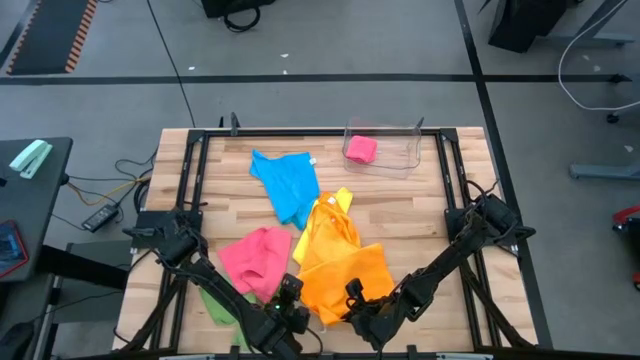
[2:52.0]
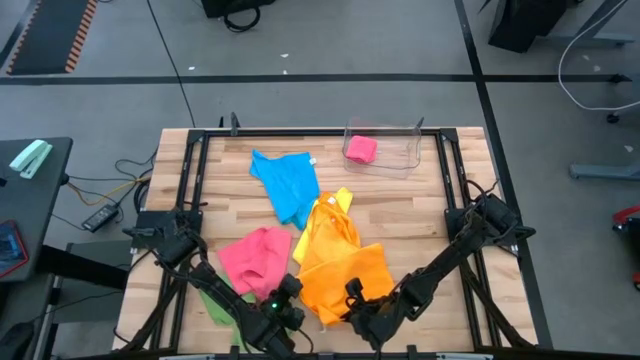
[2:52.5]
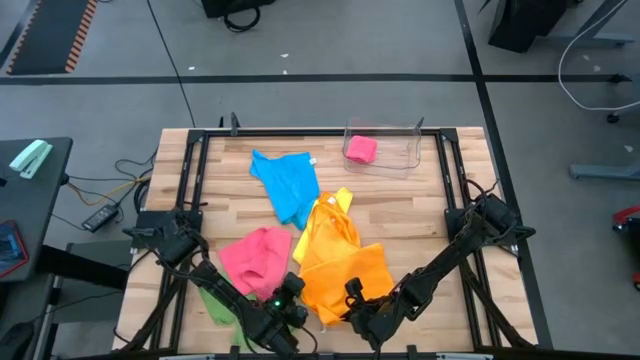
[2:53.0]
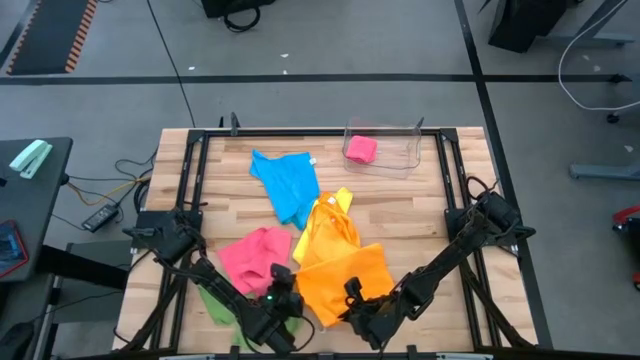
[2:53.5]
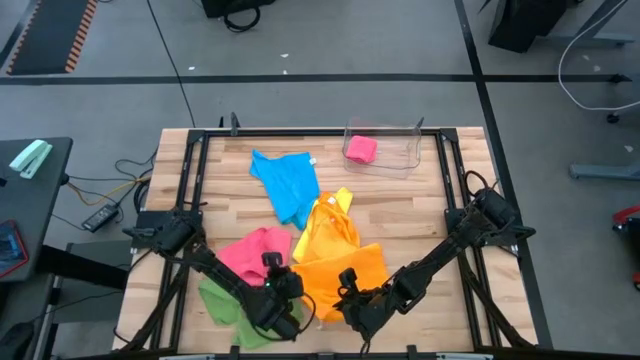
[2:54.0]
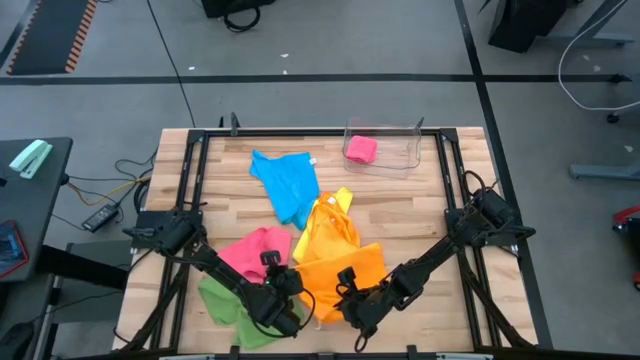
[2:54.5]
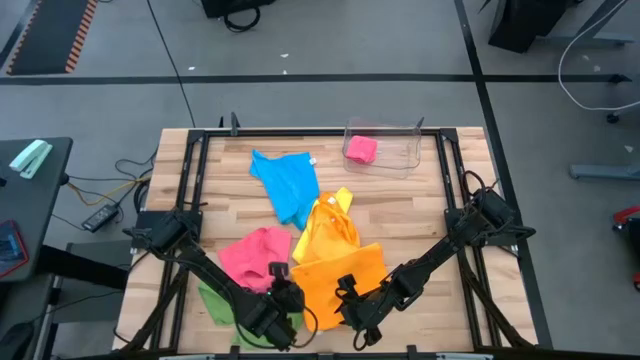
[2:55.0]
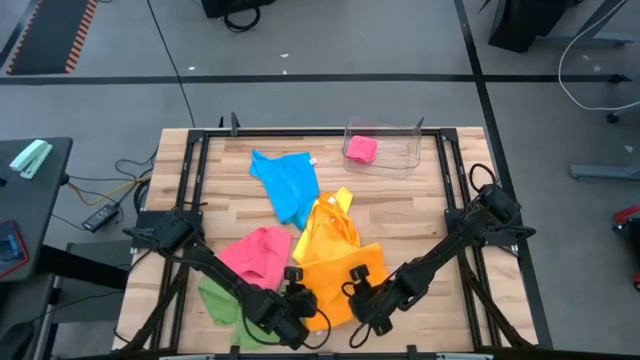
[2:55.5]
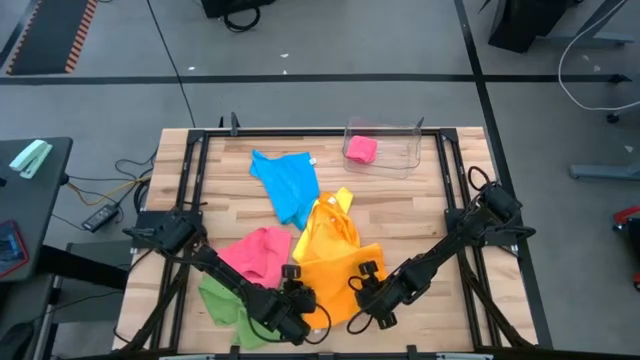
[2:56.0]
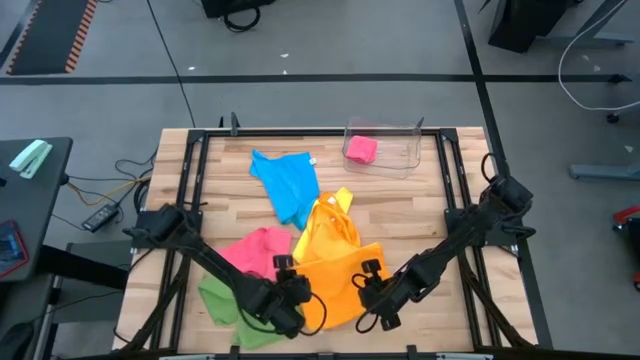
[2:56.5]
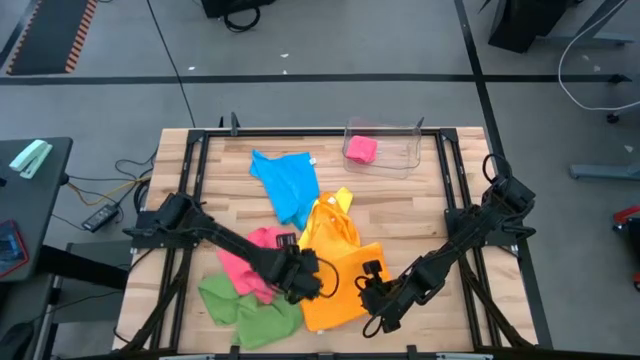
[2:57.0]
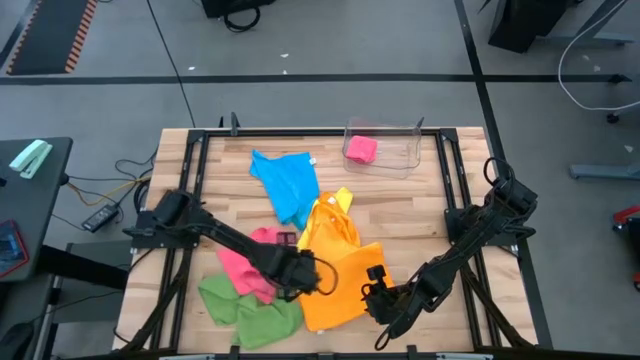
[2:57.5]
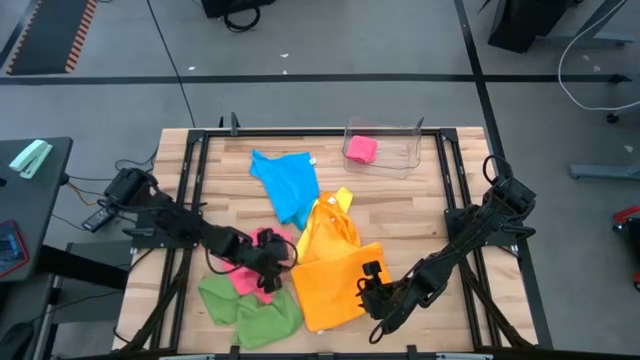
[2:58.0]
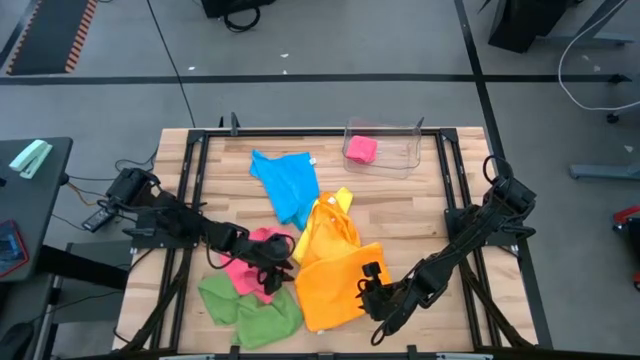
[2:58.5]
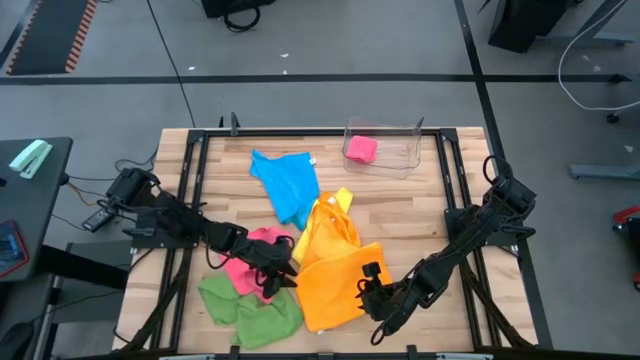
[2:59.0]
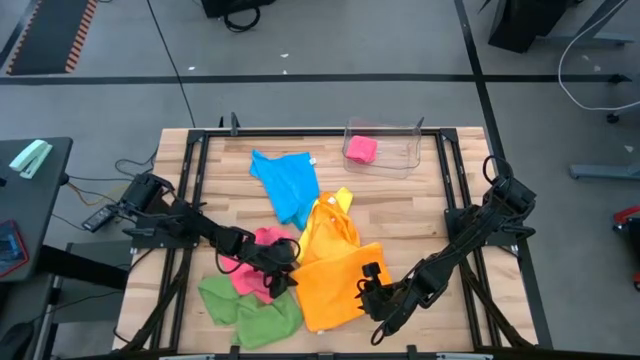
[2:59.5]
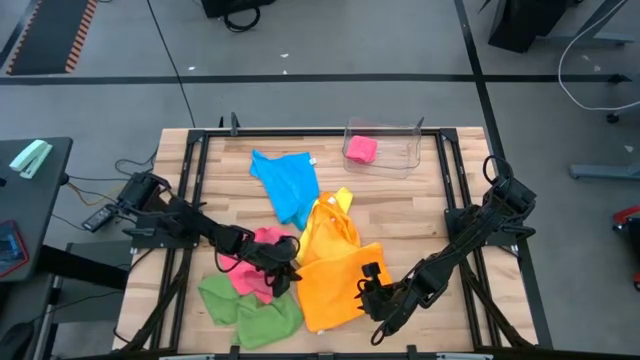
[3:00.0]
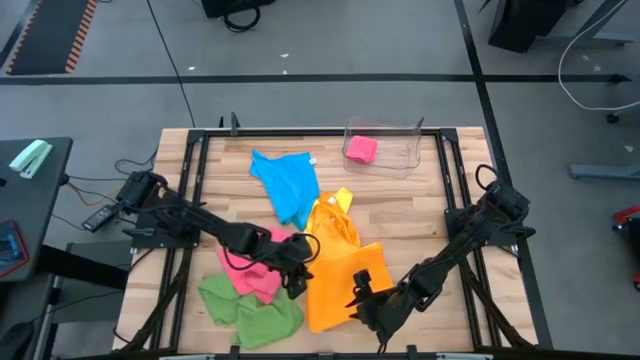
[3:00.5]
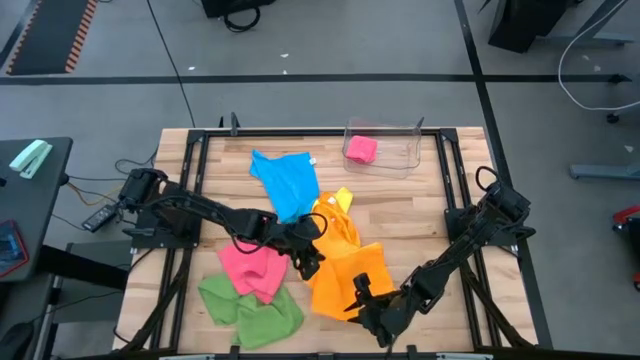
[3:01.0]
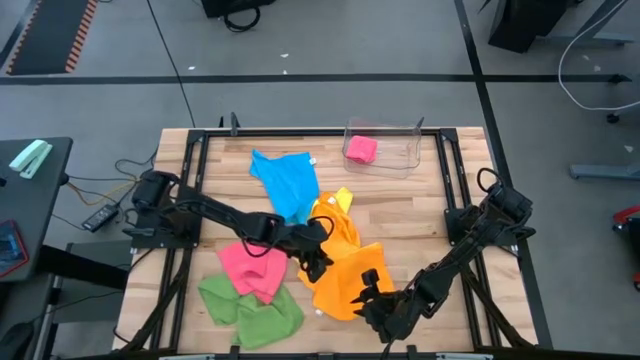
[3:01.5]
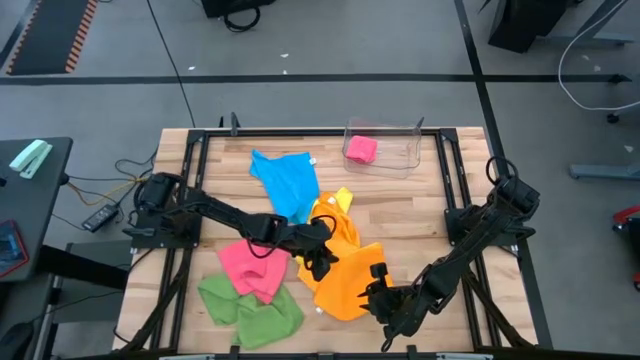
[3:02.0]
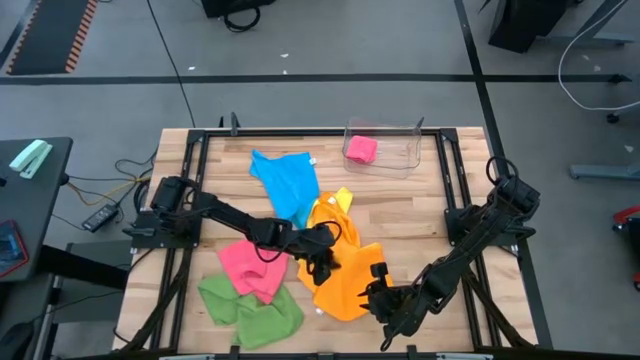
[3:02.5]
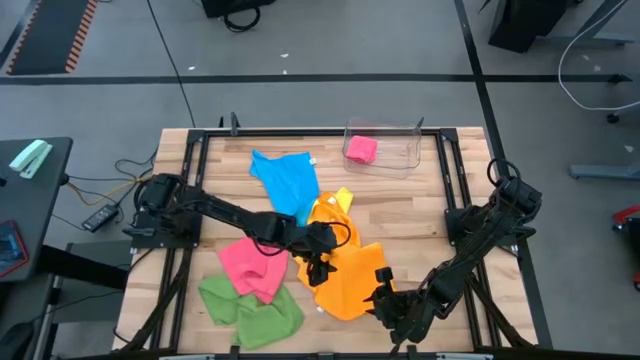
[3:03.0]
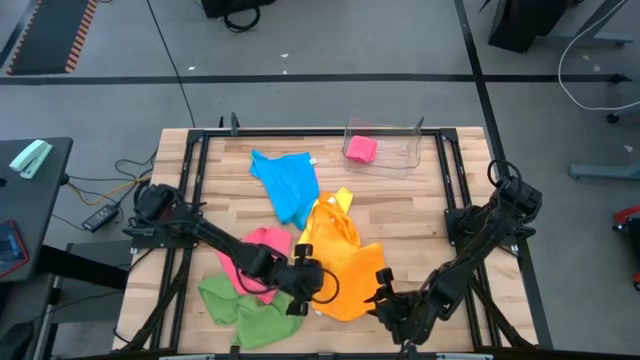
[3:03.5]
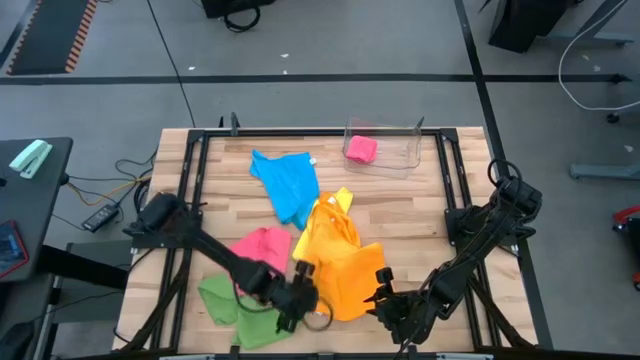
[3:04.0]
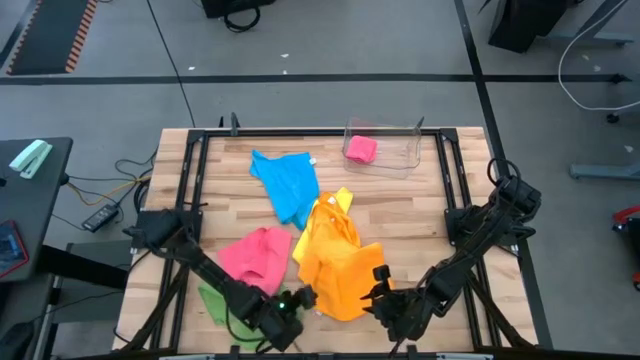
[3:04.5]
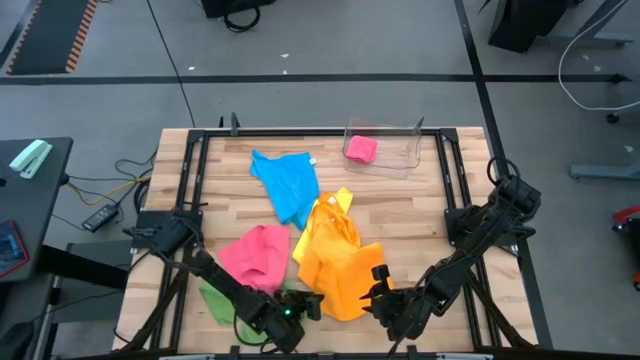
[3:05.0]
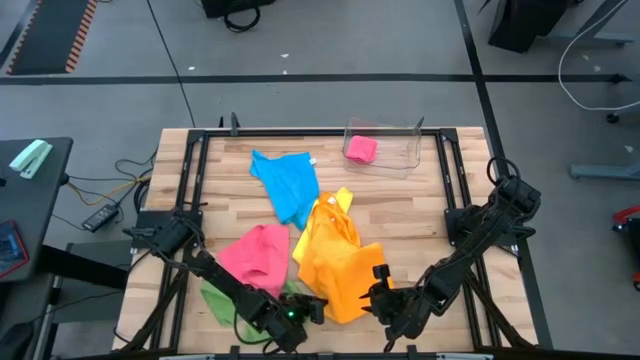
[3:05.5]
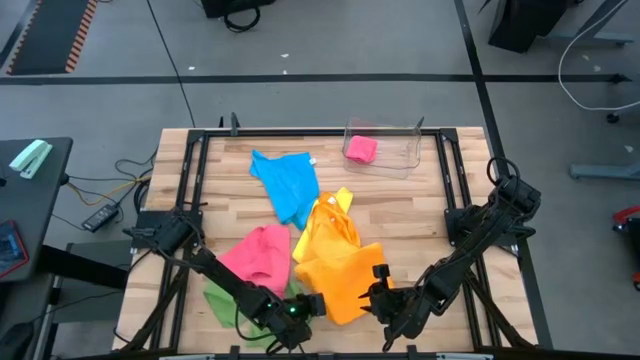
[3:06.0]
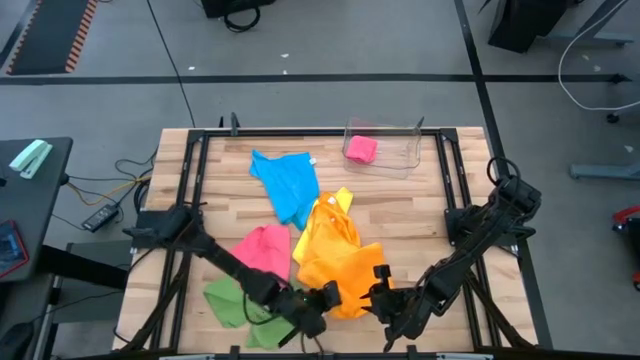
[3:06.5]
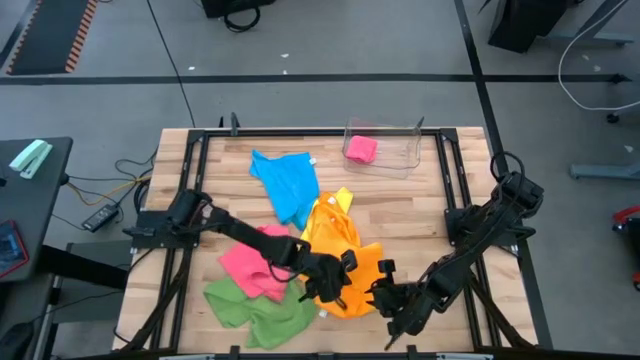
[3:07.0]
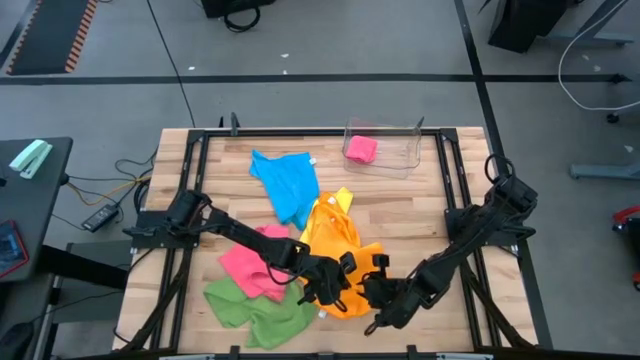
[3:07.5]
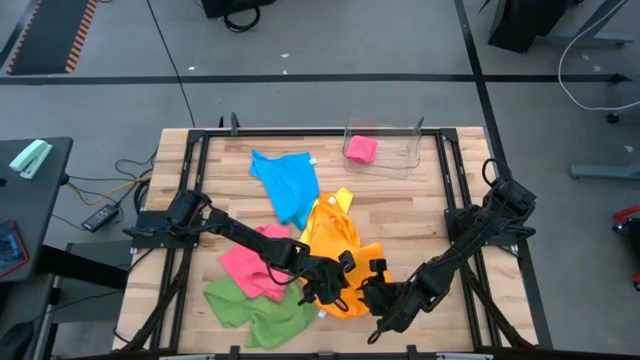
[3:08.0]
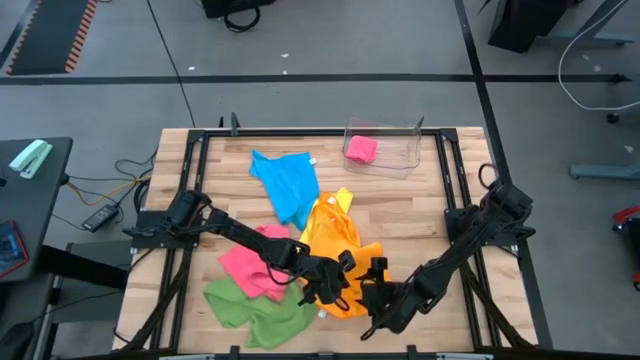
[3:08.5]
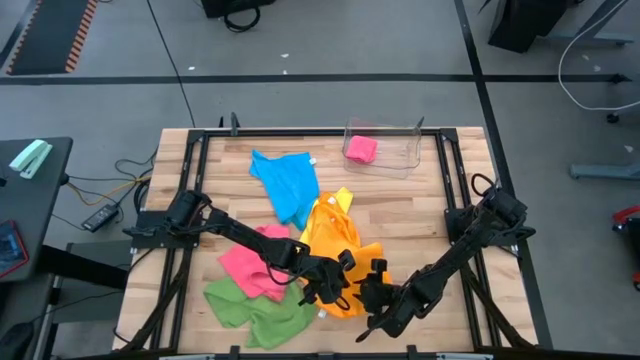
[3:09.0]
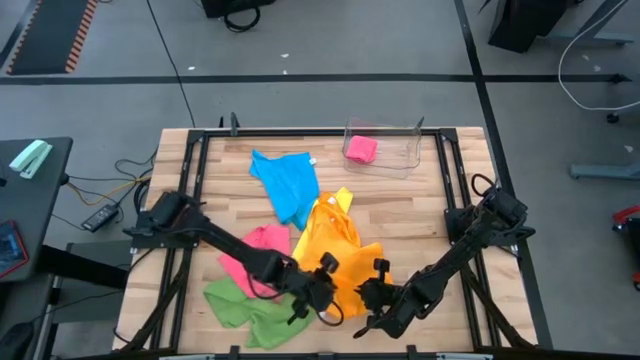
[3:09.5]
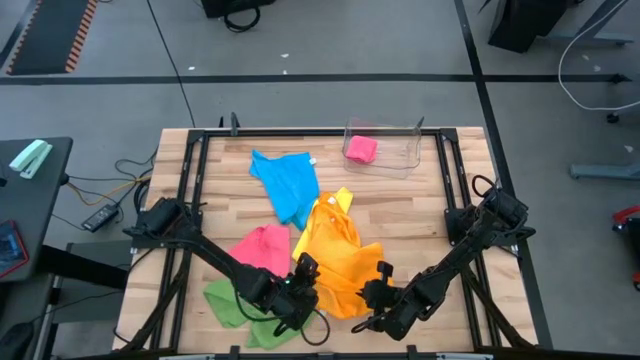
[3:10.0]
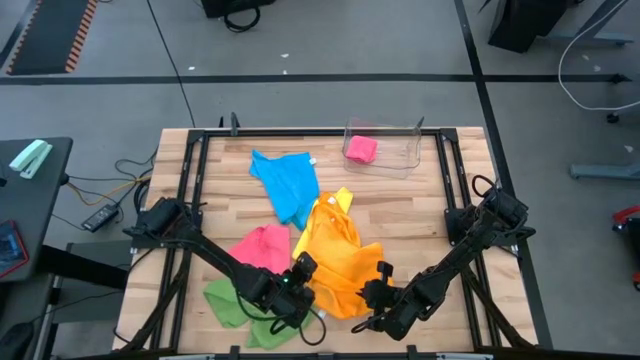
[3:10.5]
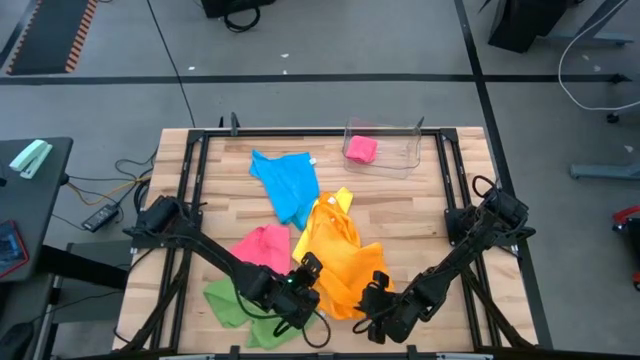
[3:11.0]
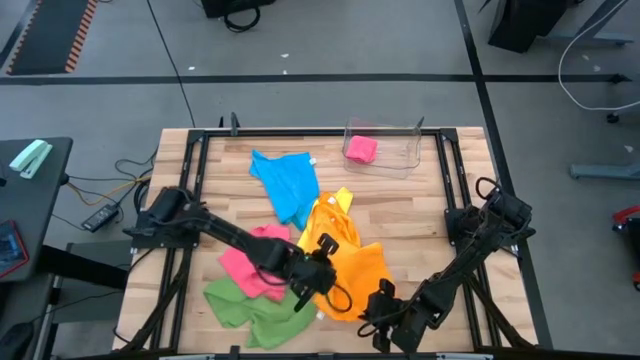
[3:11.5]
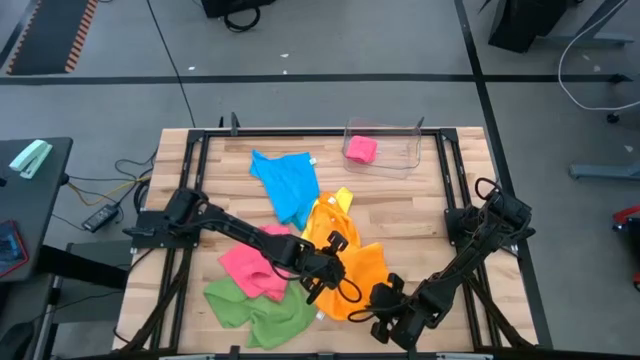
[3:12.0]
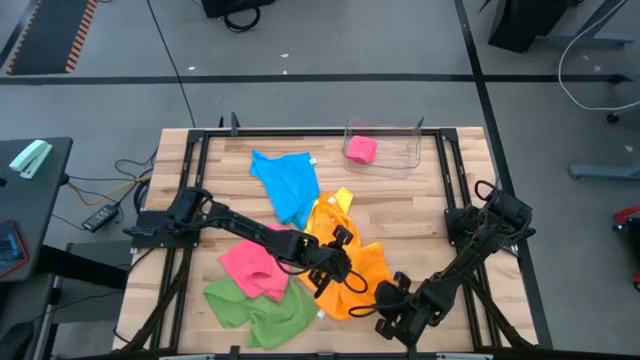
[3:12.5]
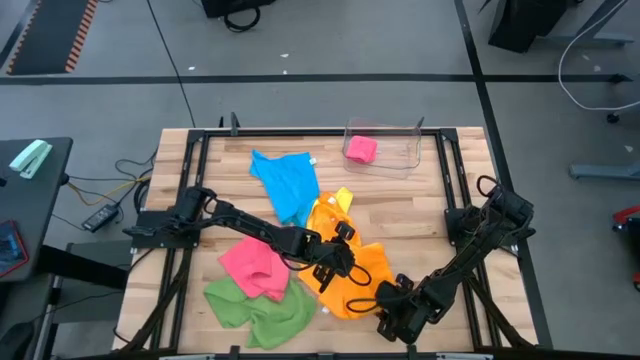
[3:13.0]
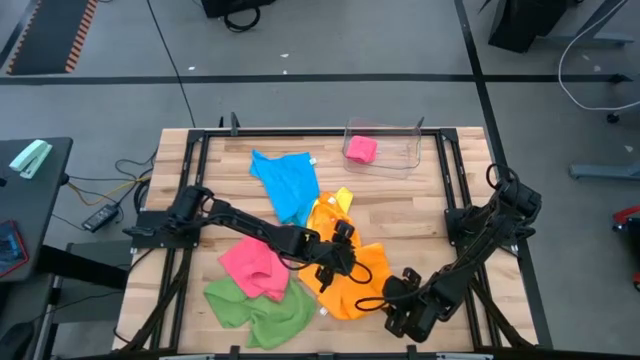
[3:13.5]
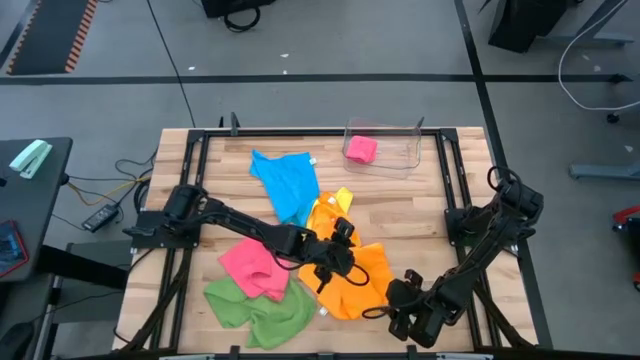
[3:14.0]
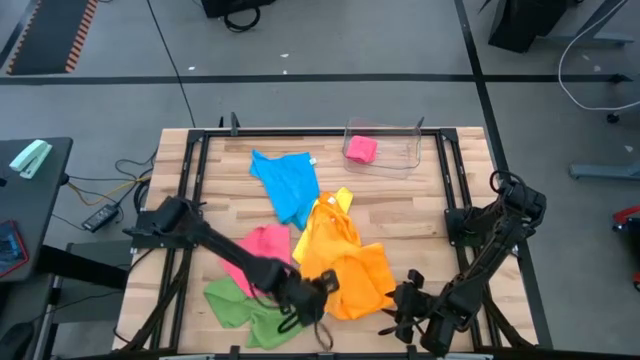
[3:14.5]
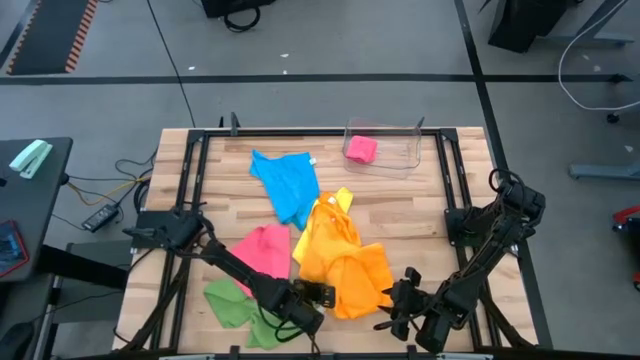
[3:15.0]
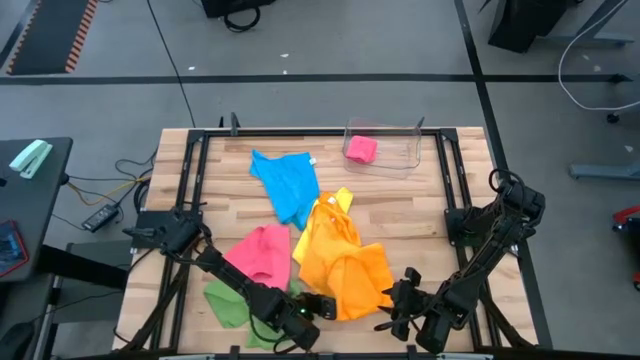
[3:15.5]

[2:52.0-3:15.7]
Task: Fold microfiber towels
Fold the right orange microfiber cloth
